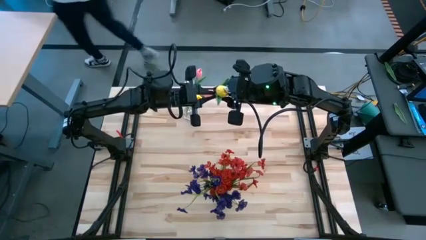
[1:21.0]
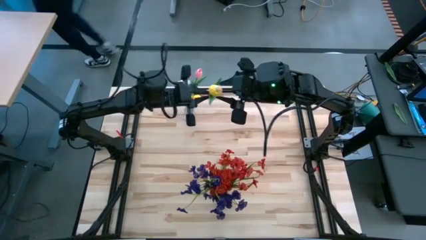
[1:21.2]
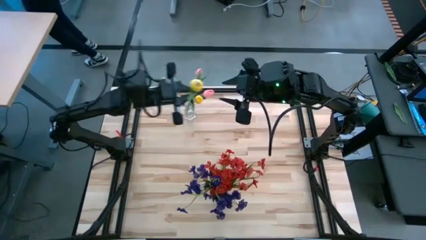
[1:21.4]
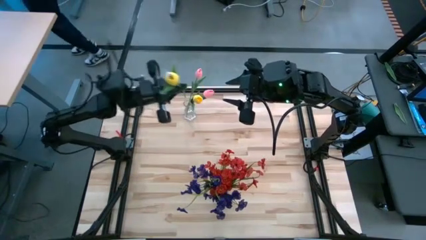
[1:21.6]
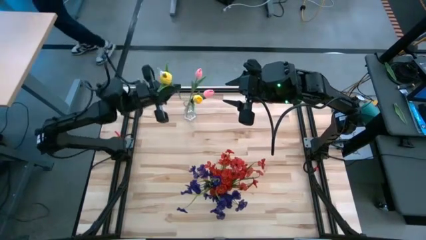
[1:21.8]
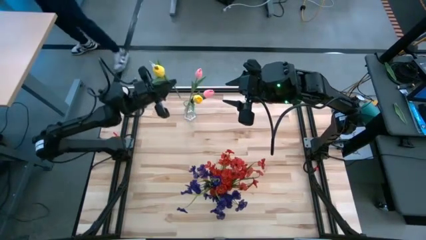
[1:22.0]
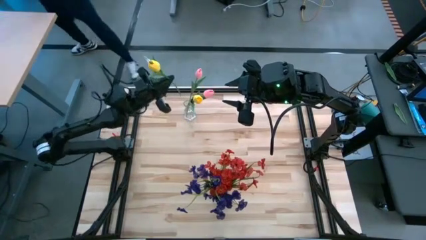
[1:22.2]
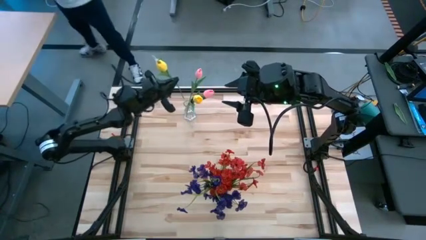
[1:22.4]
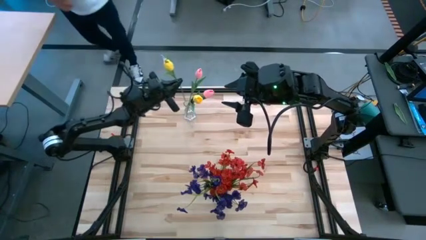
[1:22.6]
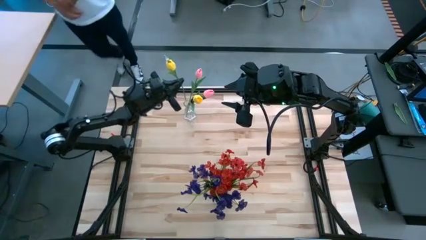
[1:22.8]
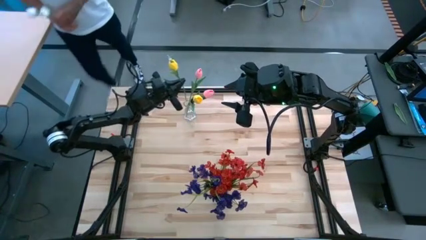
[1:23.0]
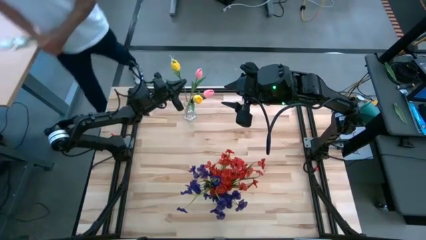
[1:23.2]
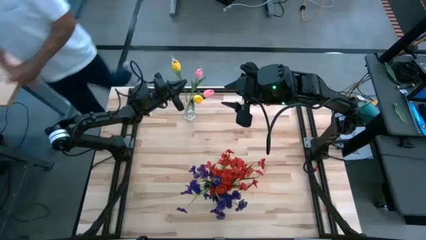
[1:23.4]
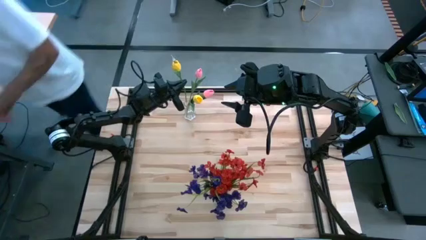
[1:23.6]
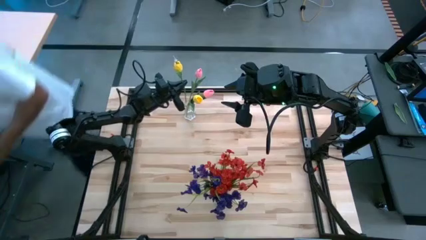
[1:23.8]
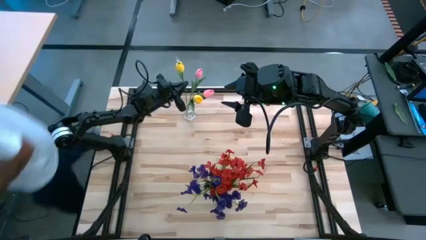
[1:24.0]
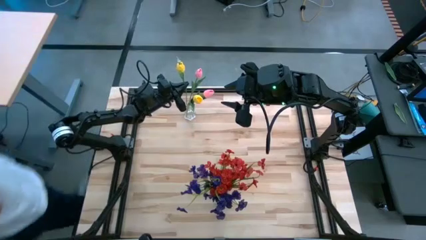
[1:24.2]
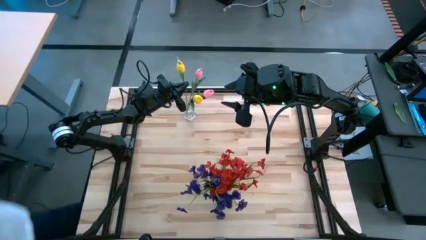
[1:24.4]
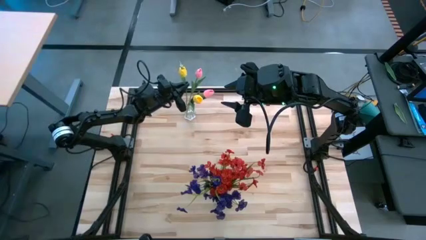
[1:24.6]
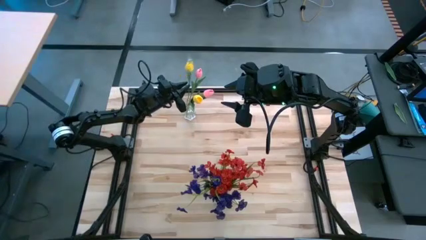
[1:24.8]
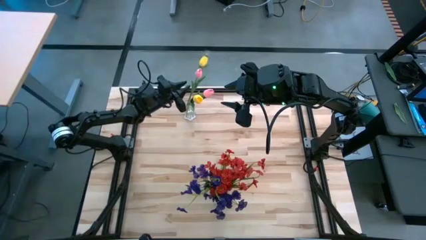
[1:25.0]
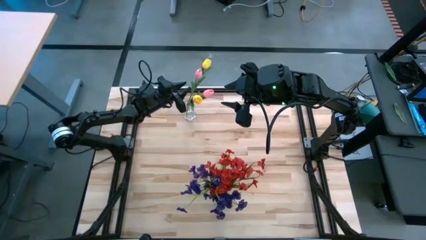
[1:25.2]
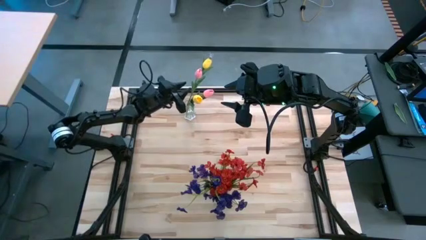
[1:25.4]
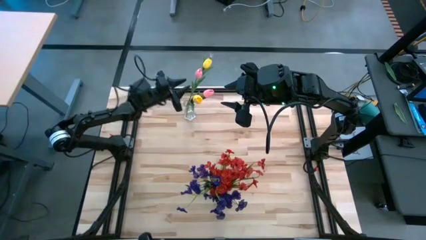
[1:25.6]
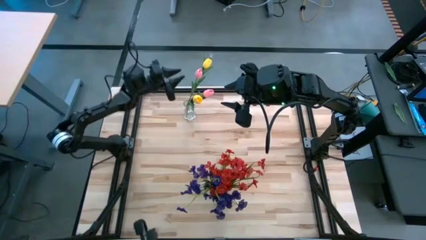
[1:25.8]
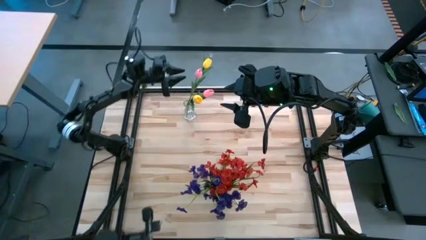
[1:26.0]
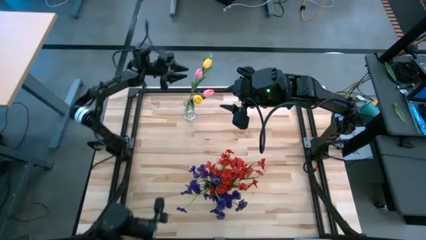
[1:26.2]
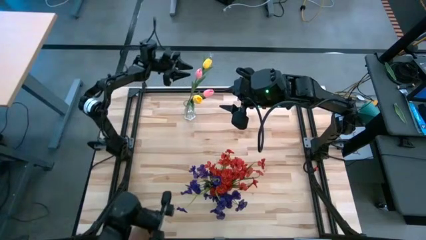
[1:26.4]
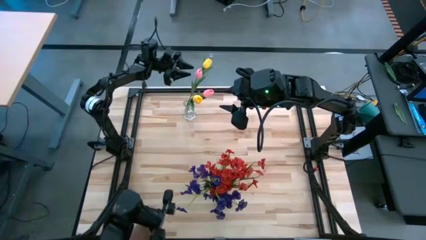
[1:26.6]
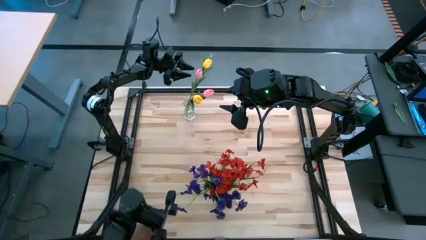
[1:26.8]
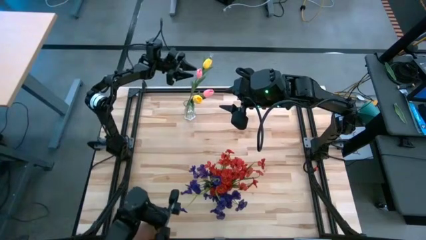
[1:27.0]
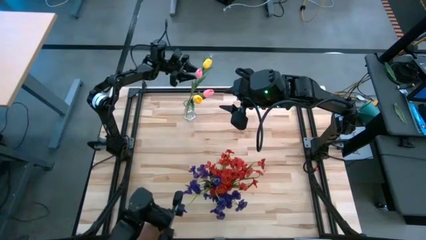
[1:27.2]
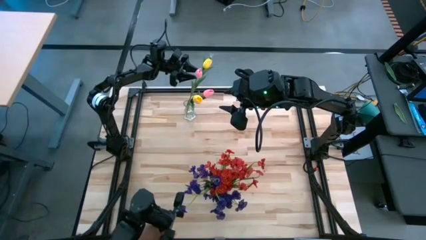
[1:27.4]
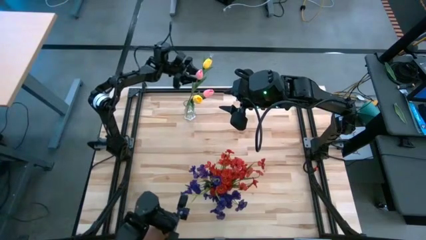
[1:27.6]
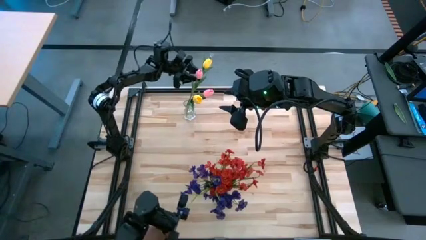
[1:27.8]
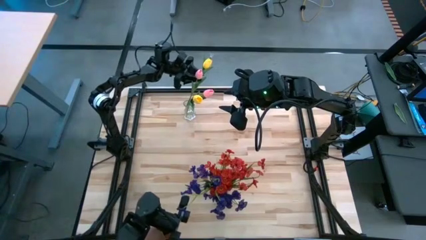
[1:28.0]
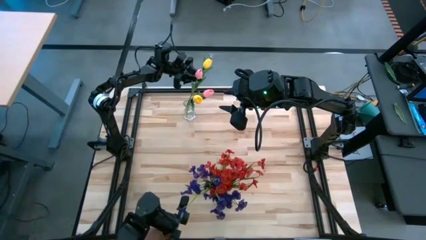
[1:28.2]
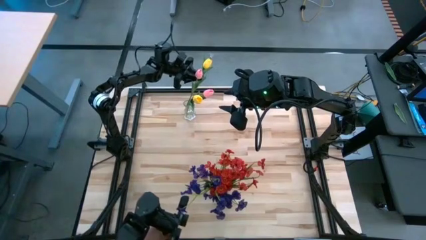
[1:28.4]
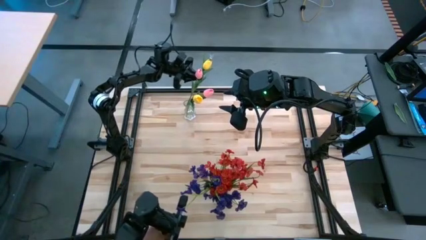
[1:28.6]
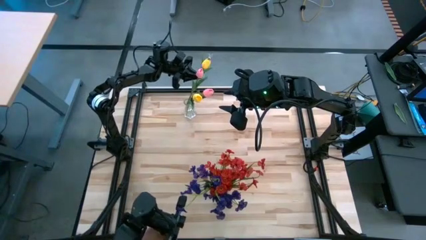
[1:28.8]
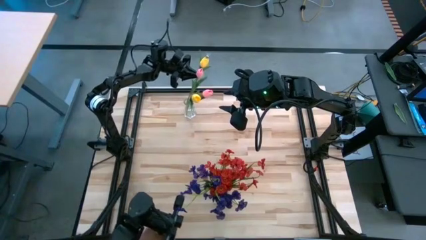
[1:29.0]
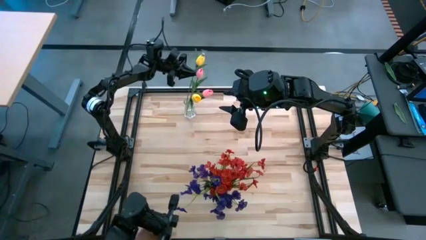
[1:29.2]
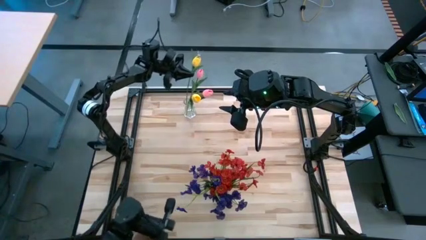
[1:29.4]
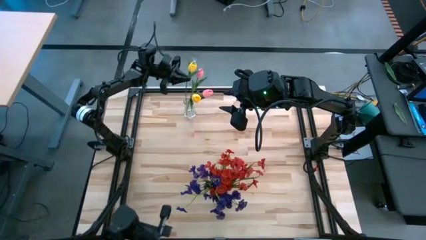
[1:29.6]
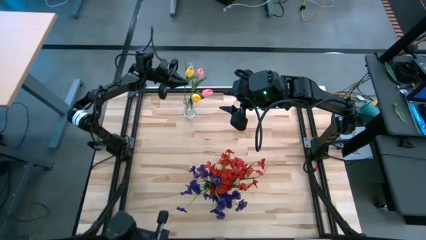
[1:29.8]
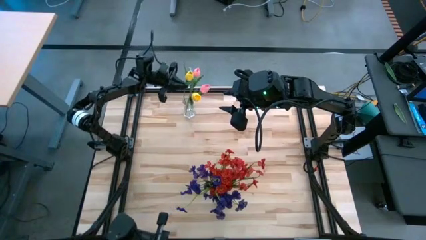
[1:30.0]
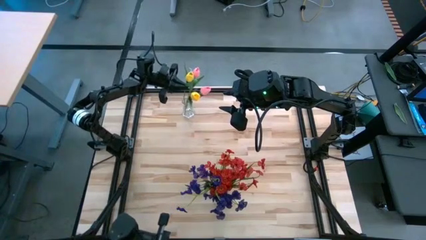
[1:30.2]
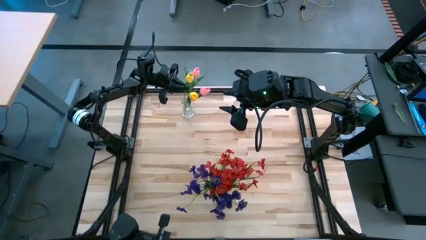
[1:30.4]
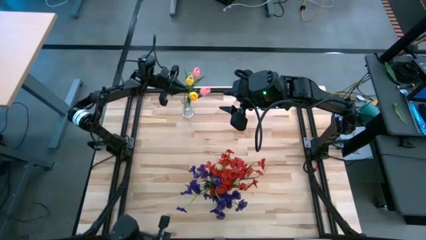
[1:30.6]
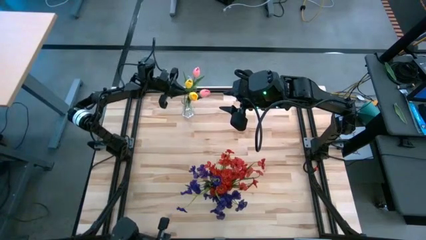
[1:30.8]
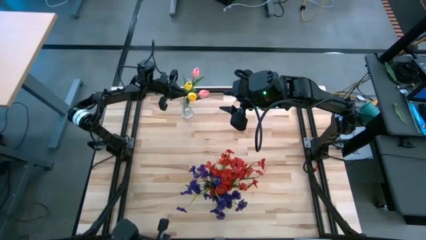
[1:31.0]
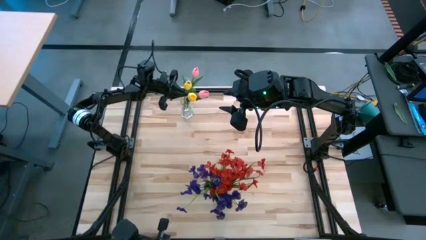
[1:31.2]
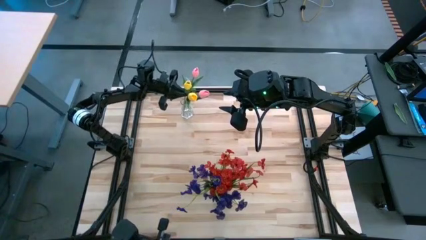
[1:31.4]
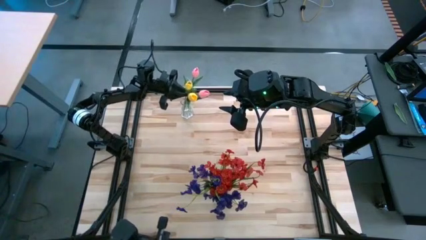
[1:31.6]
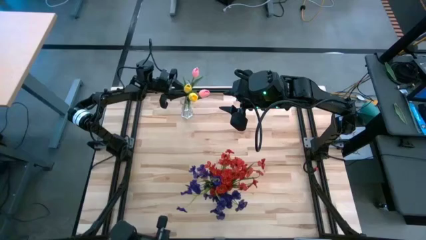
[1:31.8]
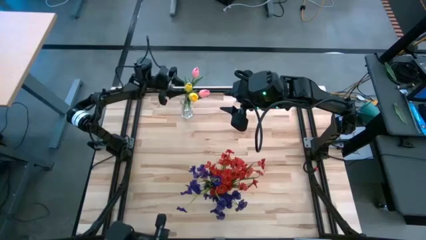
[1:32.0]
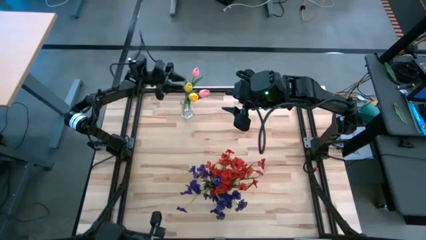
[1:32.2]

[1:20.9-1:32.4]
Task: Sort flowers into vase by color
Put the yellow flower into the transparent vase
